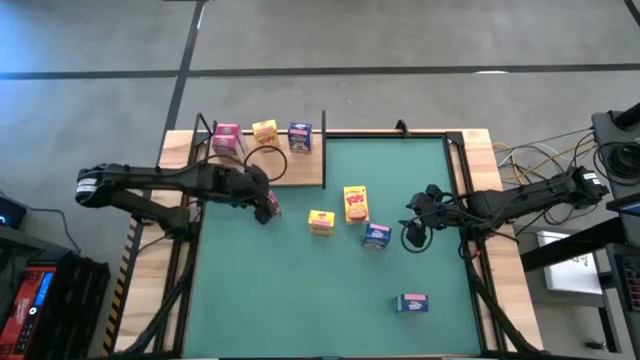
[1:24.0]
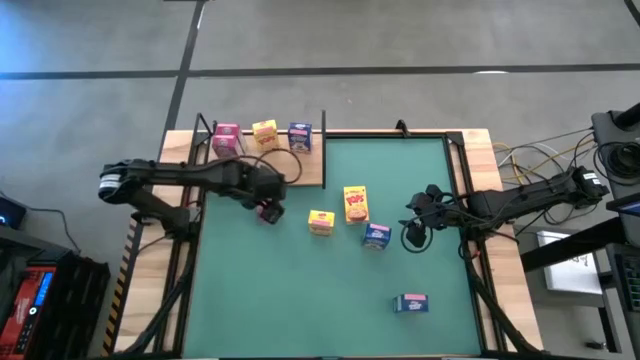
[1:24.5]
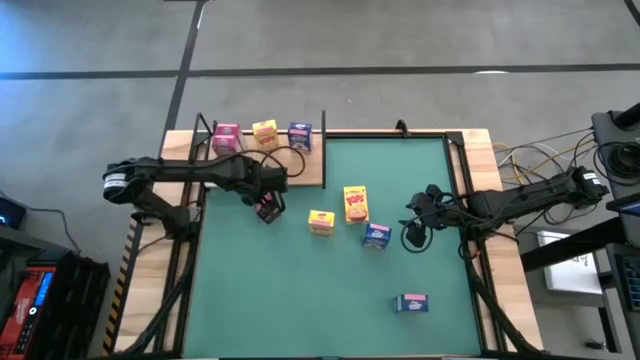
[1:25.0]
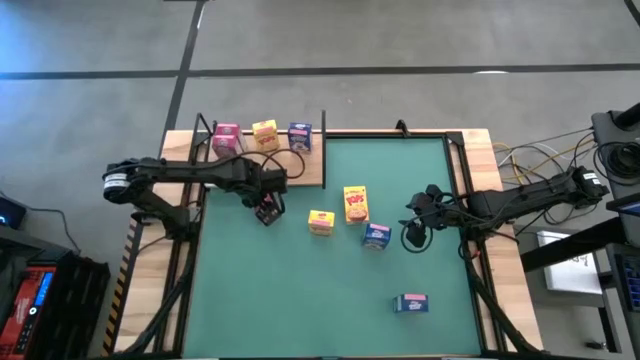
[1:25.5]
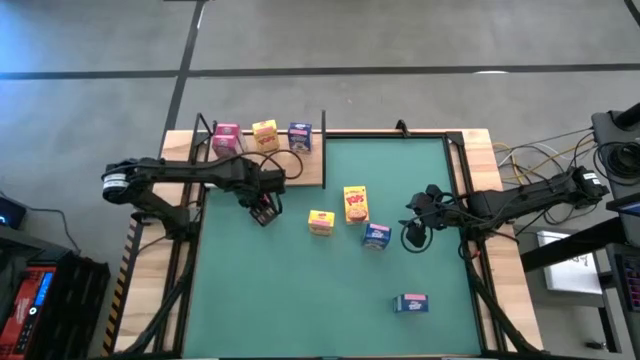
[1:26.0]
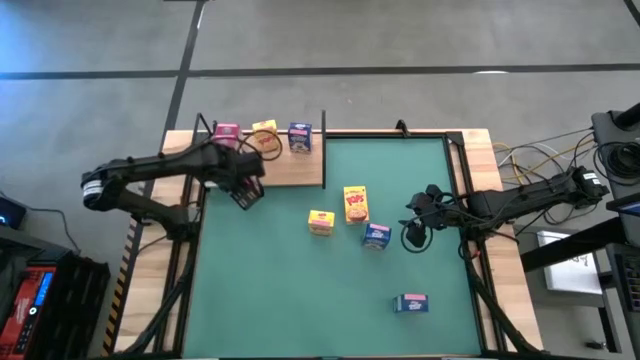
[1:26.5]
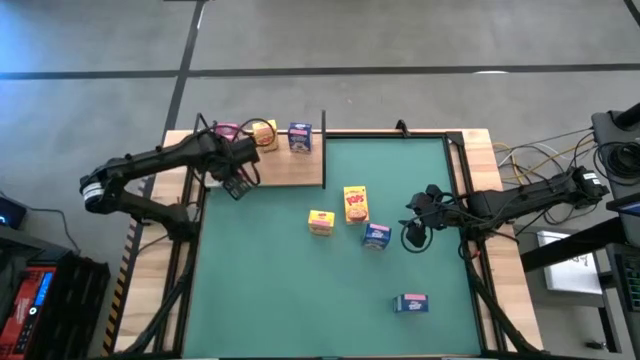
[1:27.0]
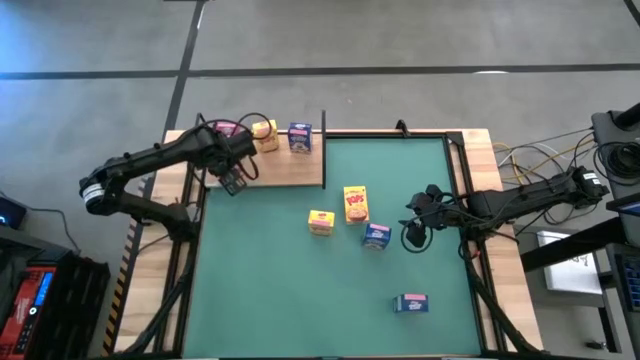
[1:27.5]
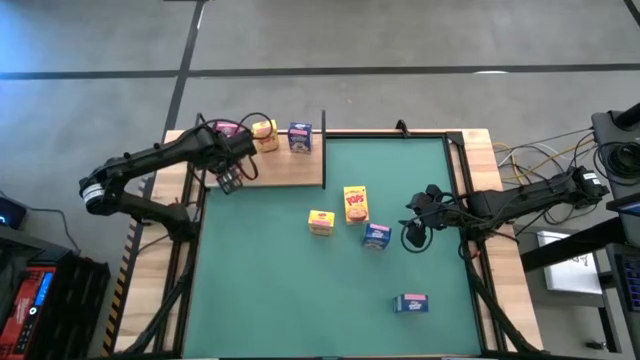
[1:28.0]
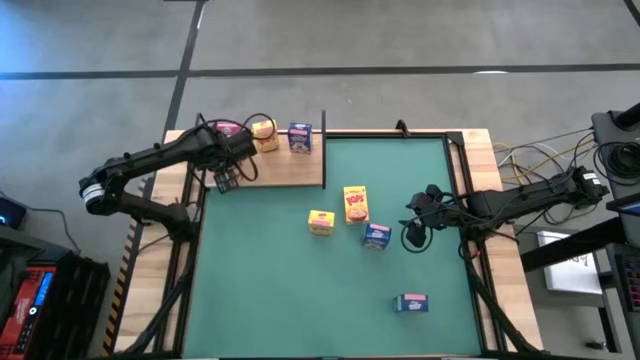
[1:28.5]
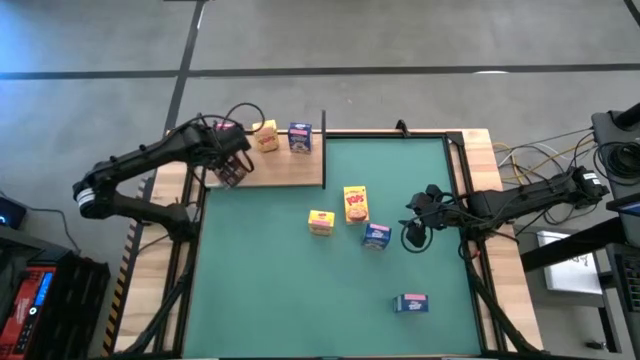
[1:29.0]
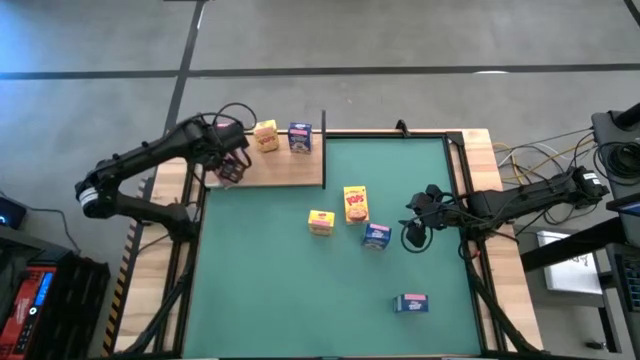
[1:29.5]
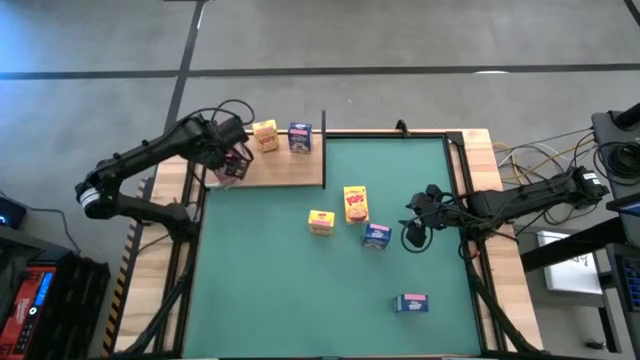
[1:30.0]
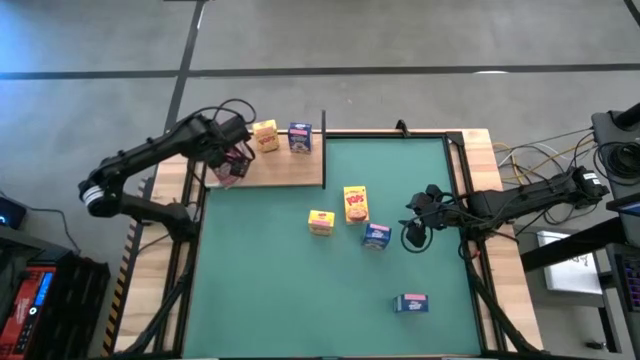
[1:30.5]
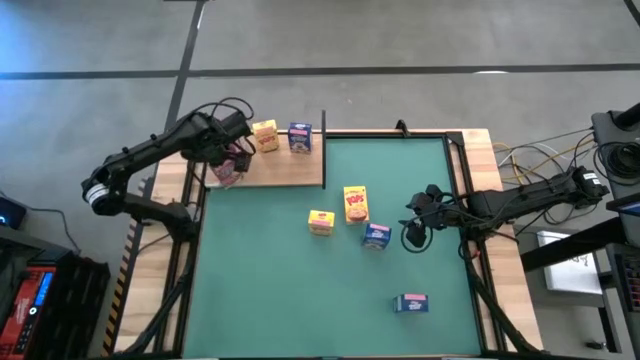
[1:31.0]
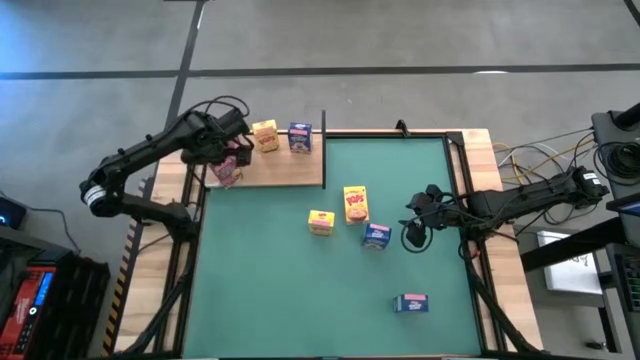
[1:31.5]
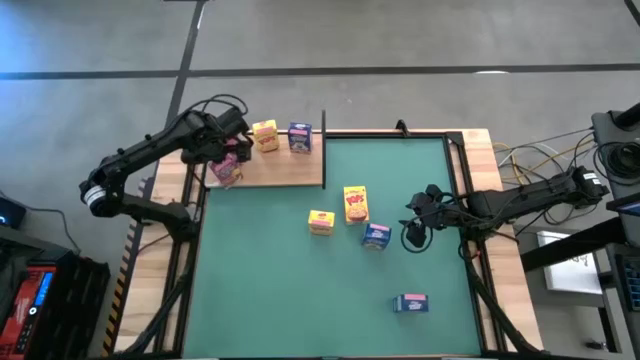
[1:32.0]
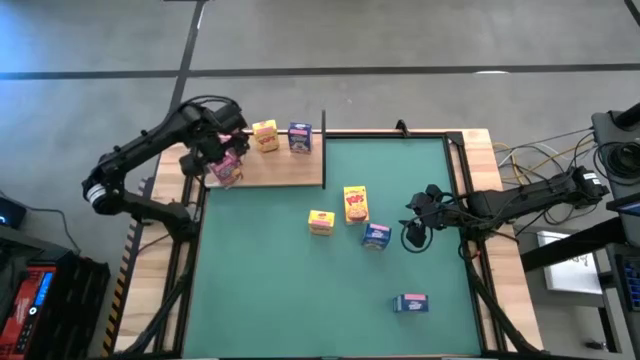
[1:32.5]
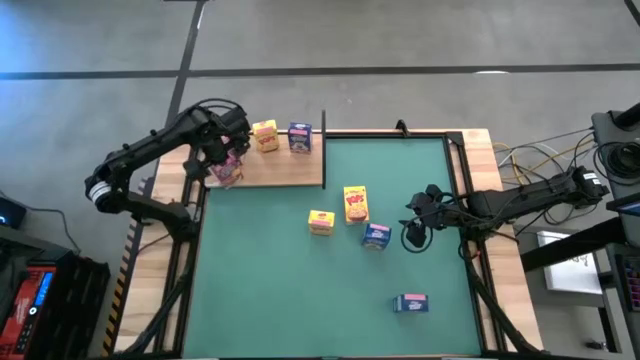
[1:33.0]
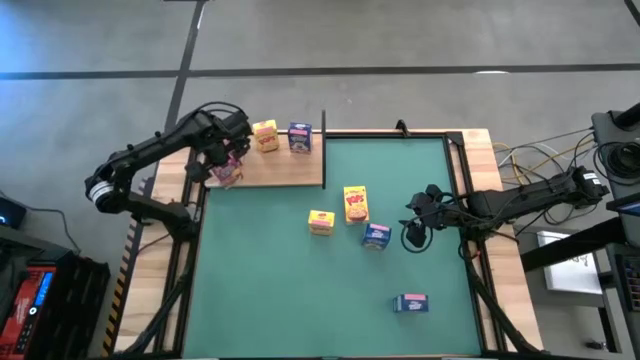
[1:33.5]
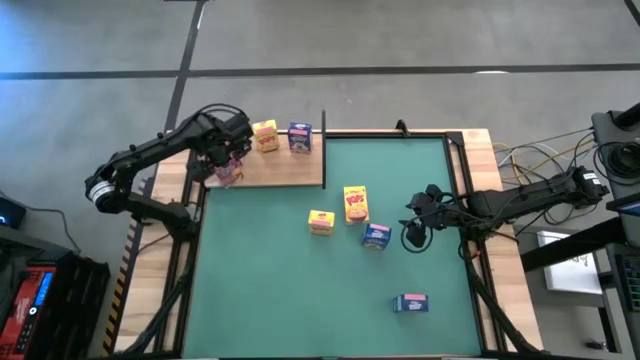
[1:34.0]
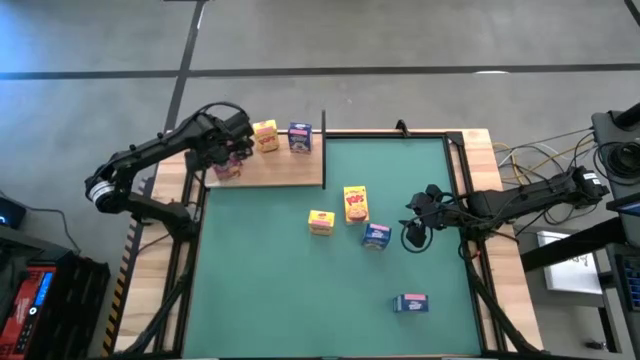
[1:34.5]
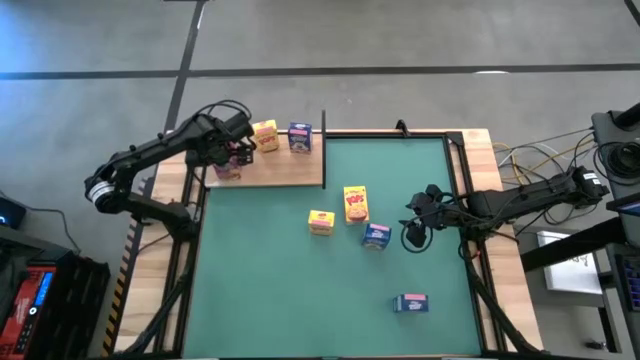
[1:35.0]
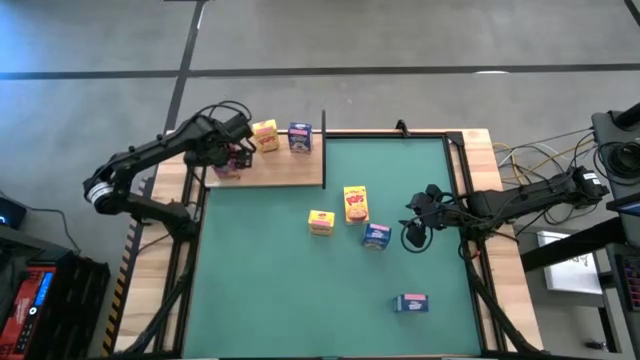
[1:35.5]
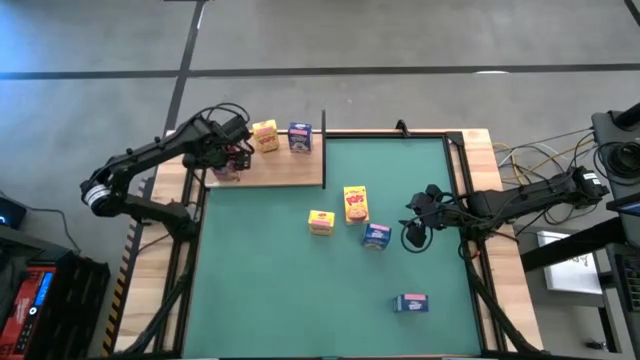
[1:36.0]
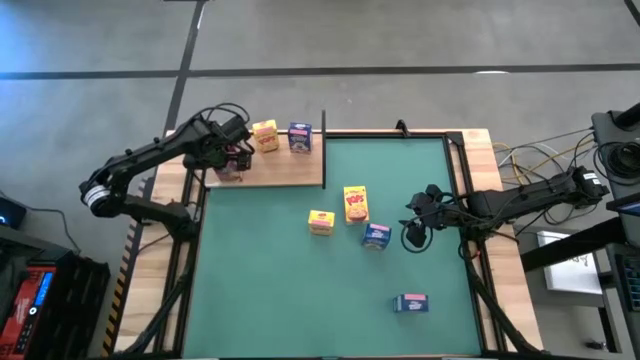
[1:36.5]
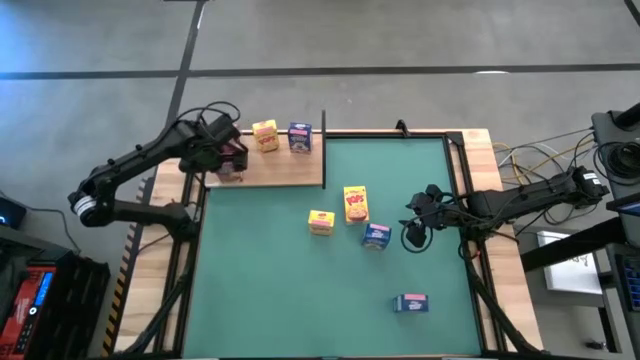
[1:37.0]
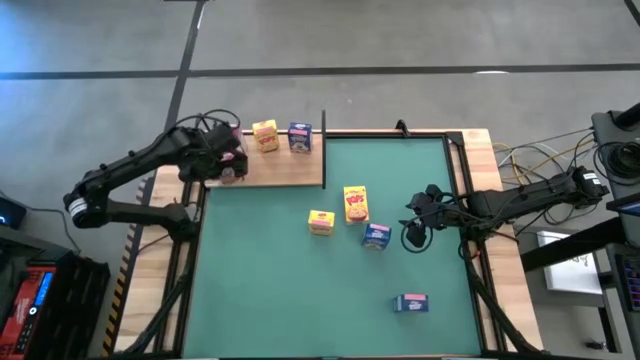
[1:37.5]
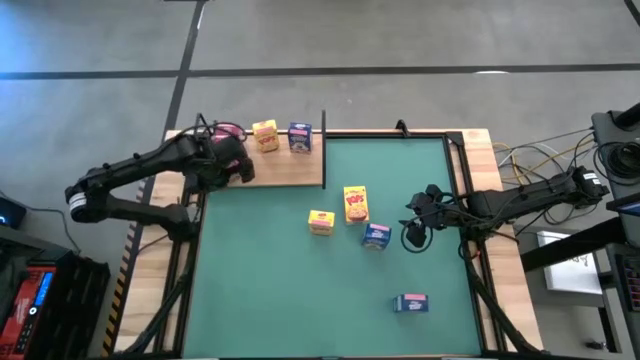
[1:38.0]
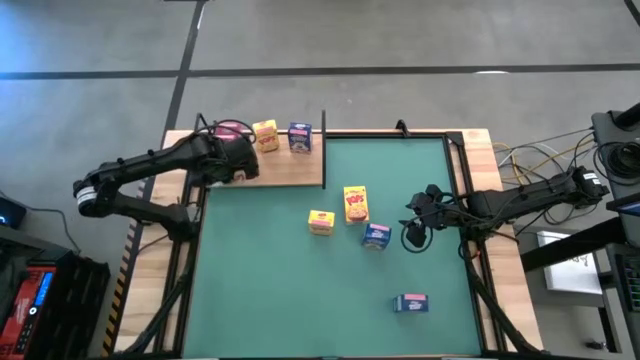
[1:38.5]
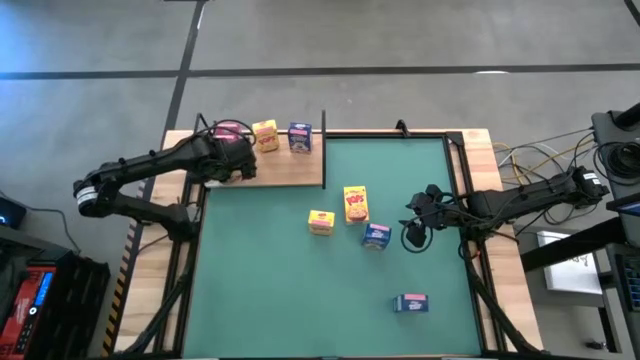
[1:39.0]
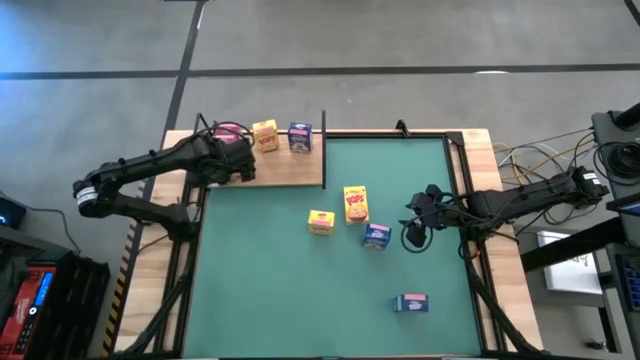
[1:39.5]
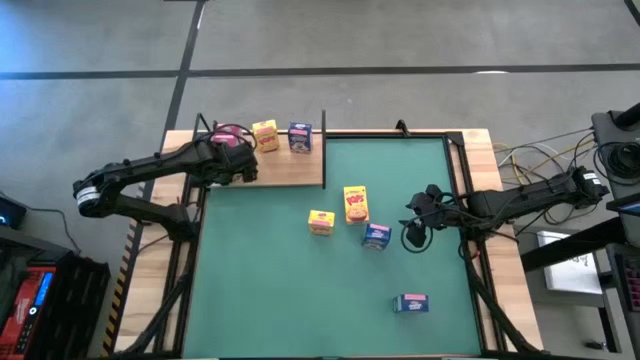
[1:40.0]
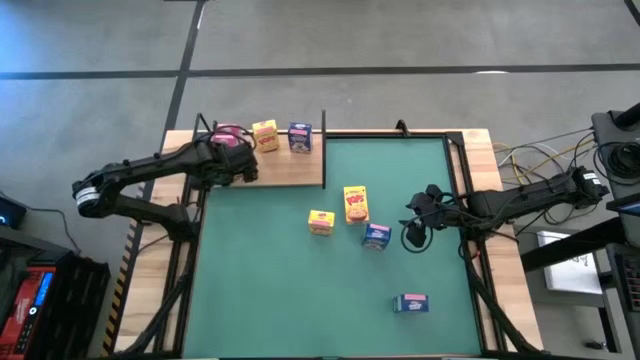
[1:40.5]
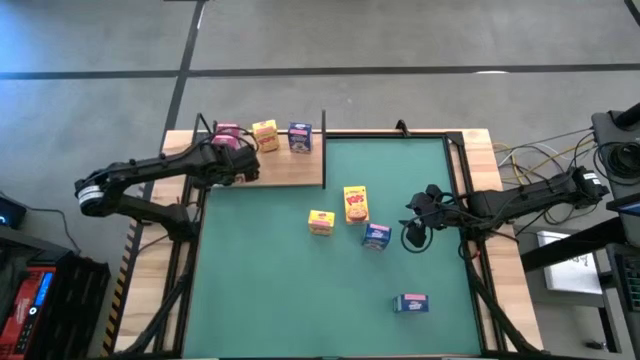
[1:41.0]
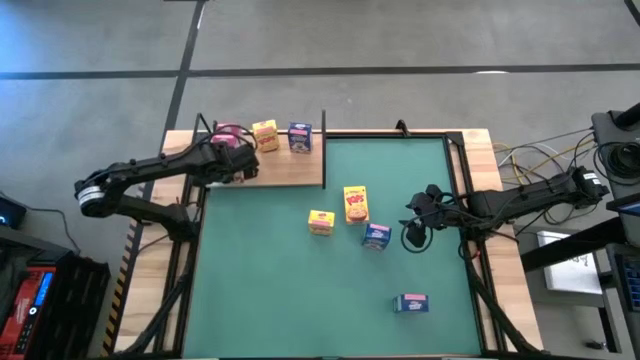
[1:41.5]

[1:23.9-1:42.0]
Task: Stack cereal on shelf
Put the pink cereal box on the shelf aligned with the pink cereal boxes
